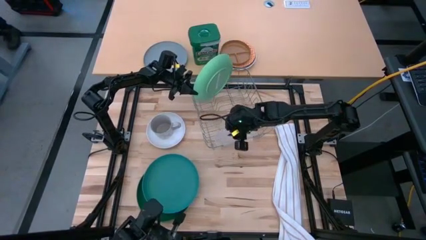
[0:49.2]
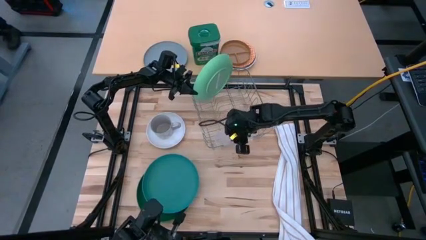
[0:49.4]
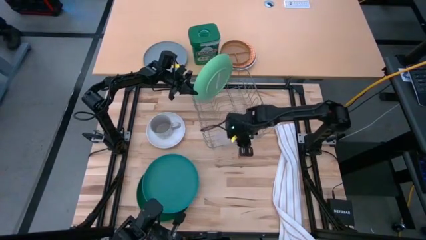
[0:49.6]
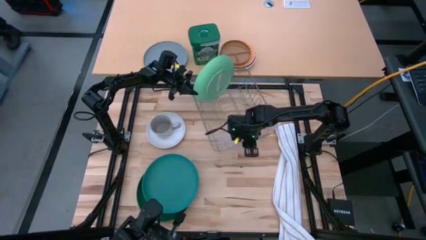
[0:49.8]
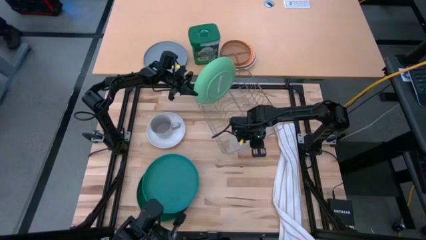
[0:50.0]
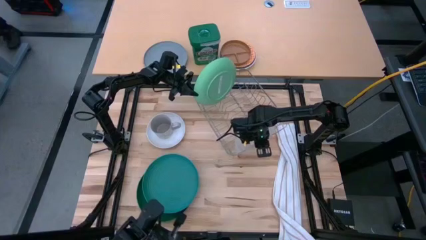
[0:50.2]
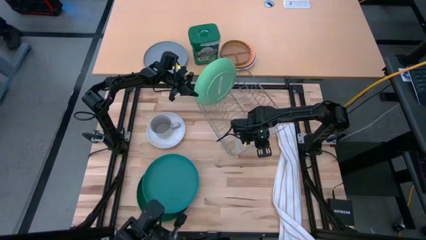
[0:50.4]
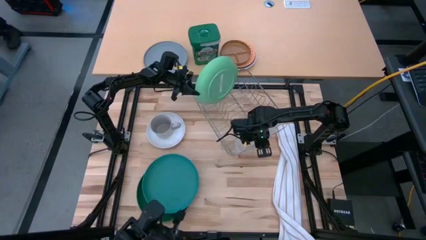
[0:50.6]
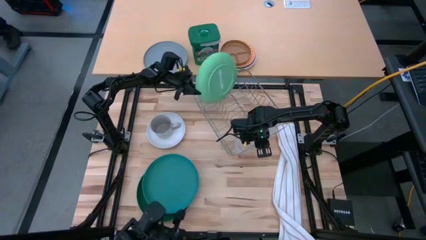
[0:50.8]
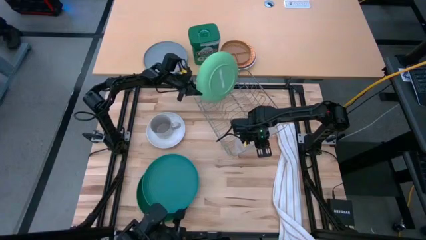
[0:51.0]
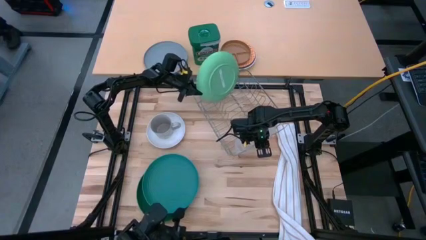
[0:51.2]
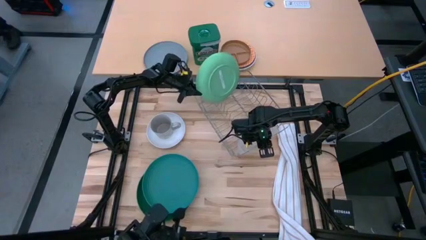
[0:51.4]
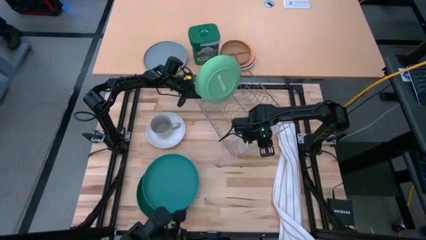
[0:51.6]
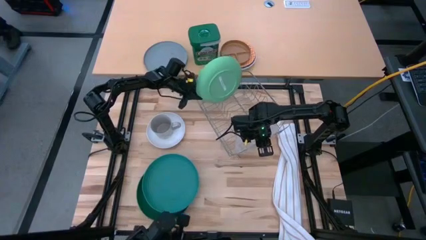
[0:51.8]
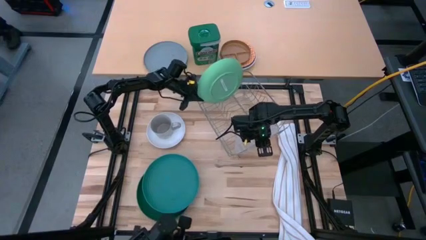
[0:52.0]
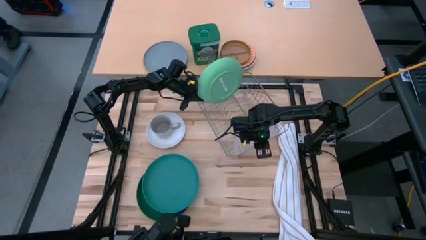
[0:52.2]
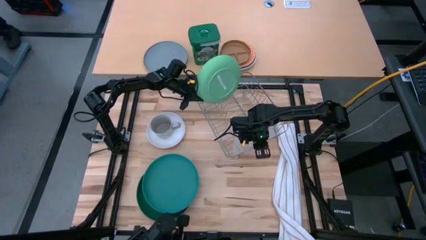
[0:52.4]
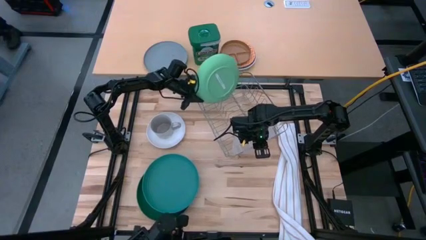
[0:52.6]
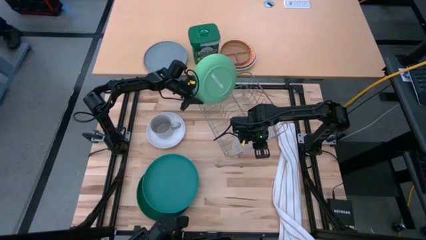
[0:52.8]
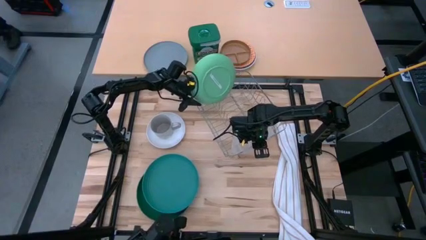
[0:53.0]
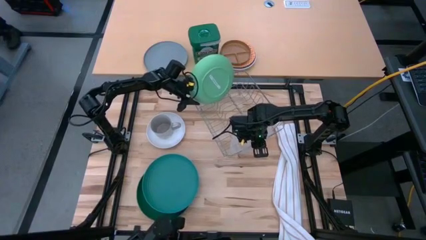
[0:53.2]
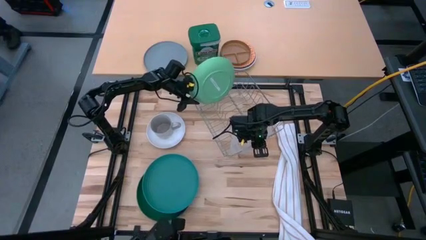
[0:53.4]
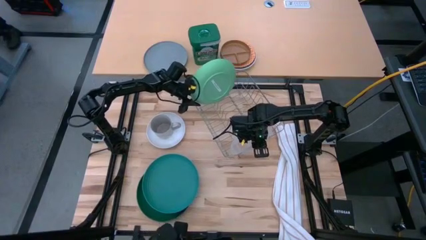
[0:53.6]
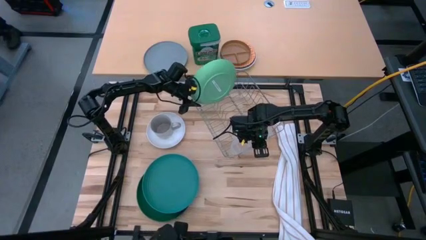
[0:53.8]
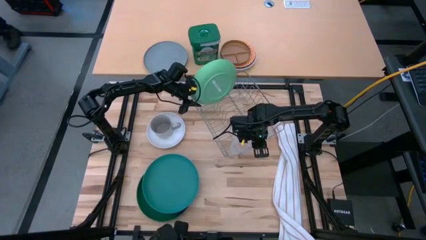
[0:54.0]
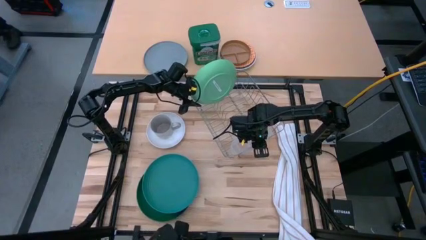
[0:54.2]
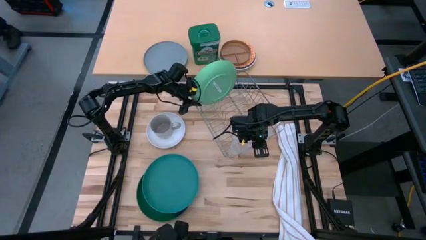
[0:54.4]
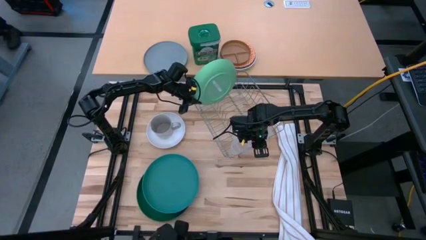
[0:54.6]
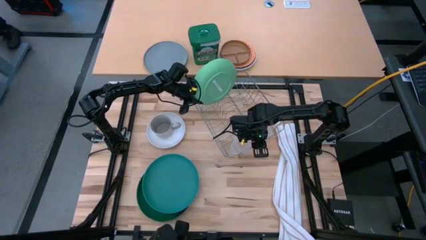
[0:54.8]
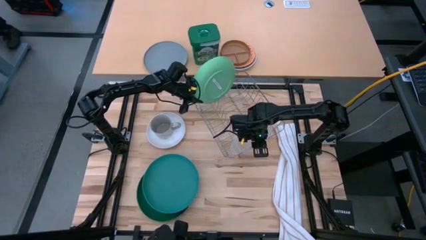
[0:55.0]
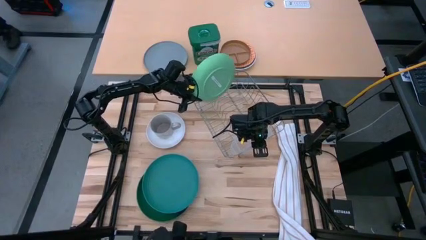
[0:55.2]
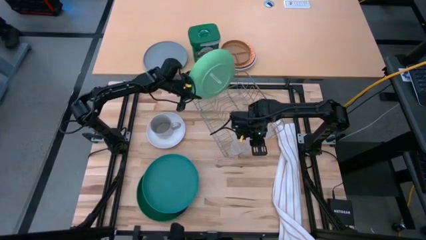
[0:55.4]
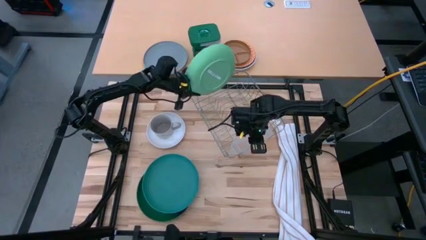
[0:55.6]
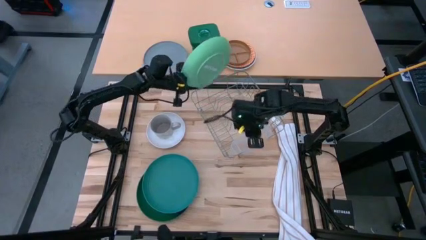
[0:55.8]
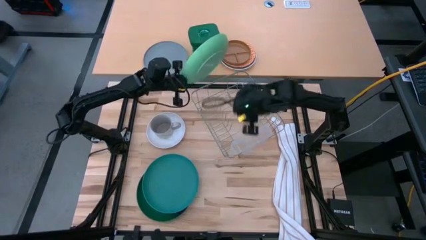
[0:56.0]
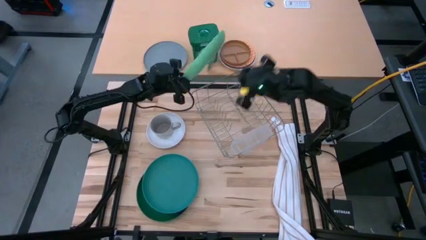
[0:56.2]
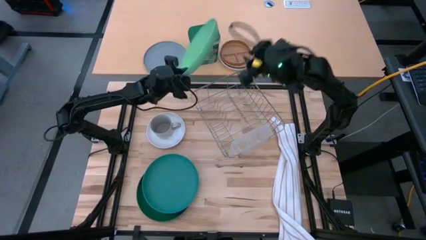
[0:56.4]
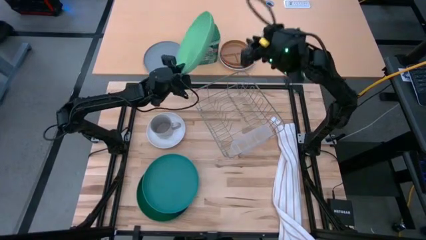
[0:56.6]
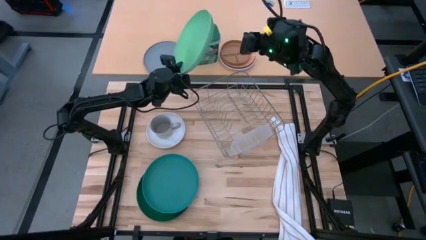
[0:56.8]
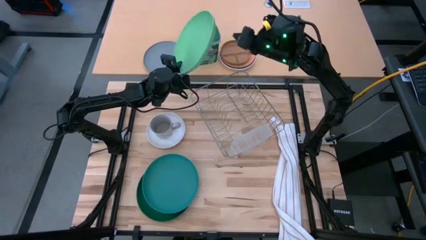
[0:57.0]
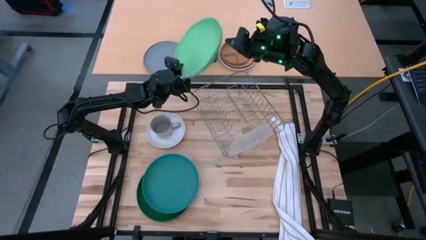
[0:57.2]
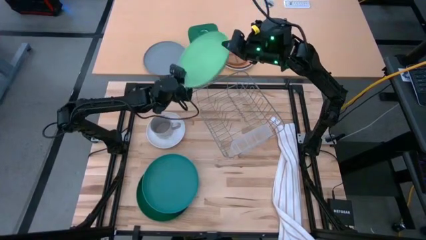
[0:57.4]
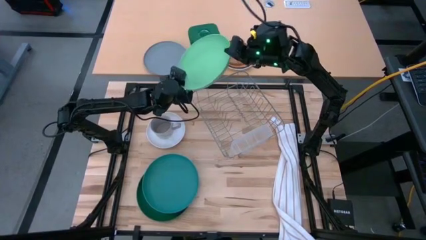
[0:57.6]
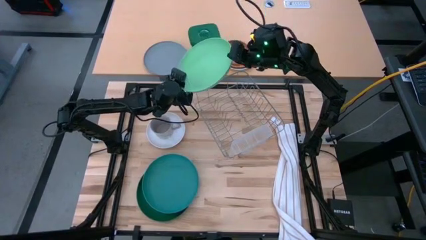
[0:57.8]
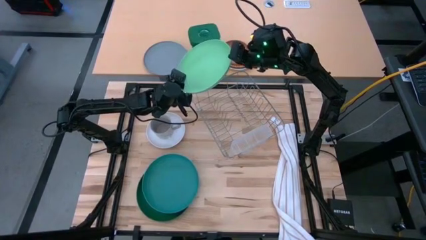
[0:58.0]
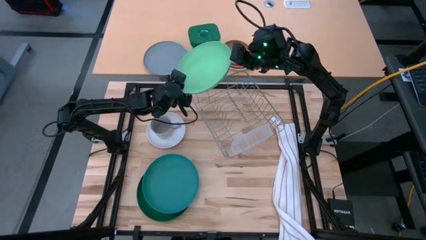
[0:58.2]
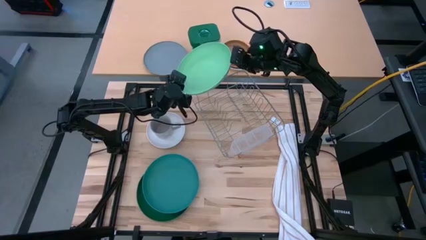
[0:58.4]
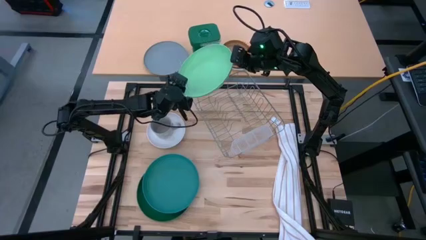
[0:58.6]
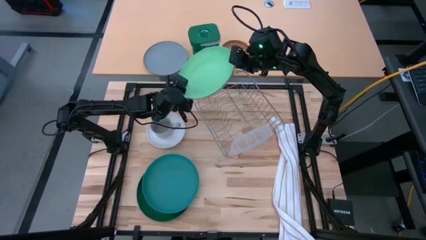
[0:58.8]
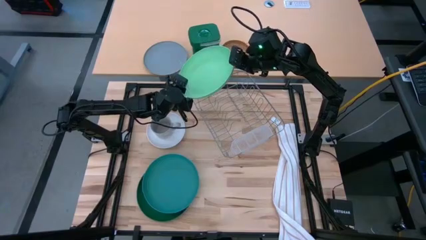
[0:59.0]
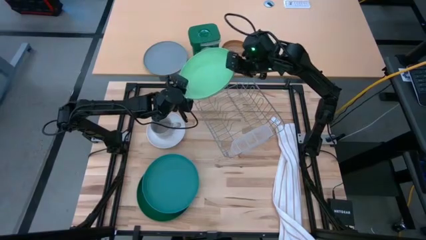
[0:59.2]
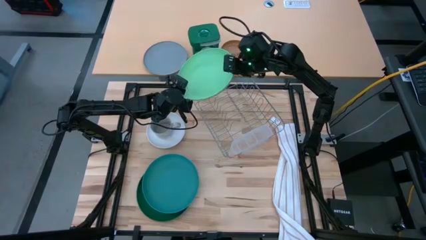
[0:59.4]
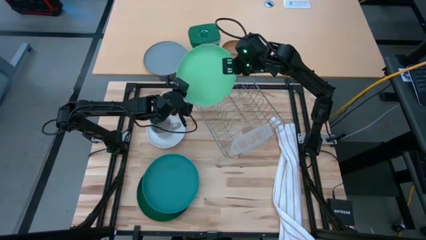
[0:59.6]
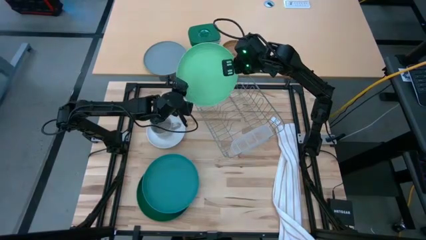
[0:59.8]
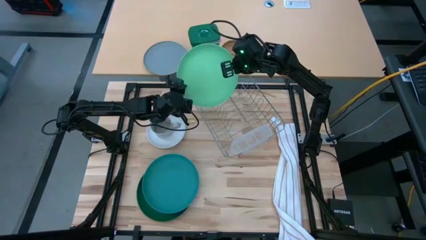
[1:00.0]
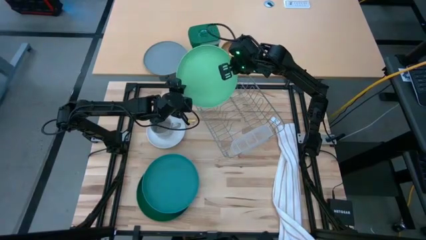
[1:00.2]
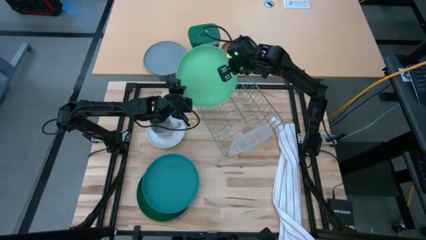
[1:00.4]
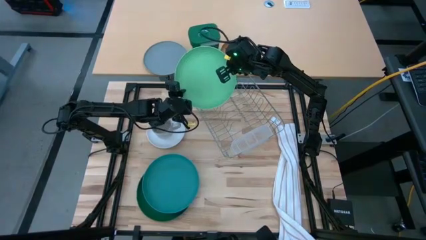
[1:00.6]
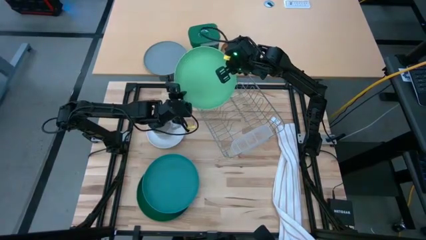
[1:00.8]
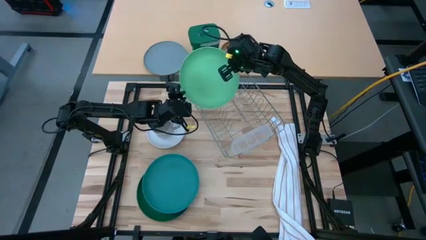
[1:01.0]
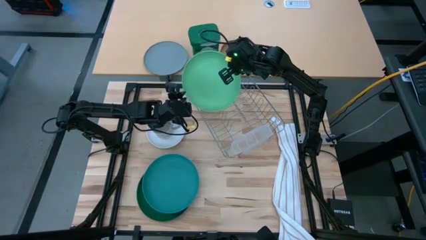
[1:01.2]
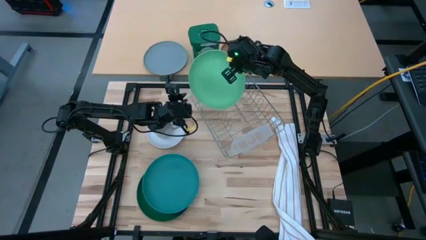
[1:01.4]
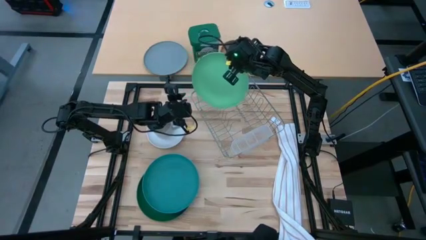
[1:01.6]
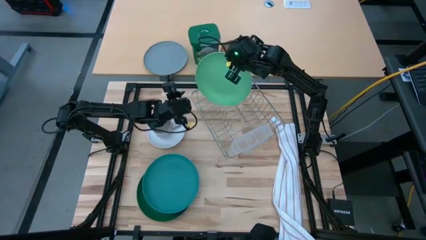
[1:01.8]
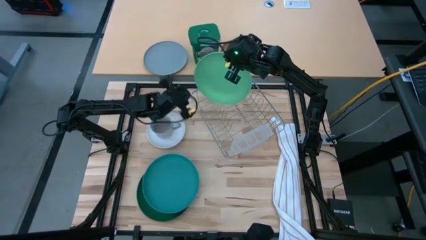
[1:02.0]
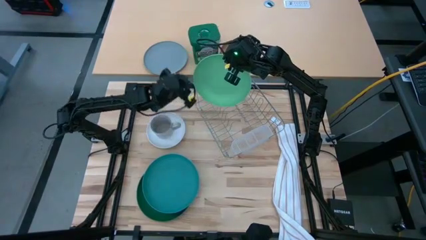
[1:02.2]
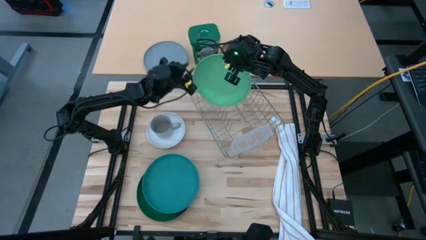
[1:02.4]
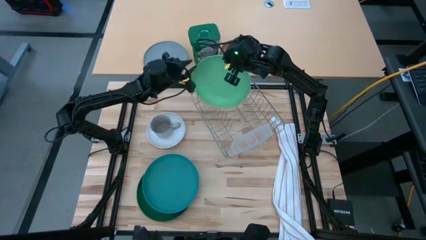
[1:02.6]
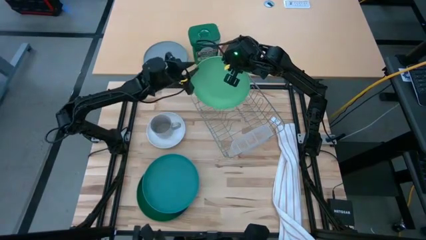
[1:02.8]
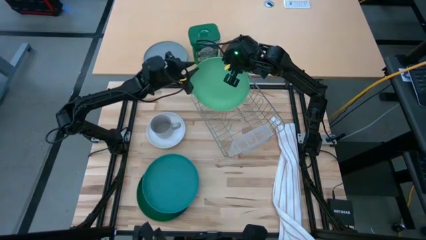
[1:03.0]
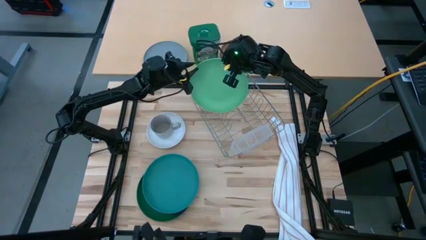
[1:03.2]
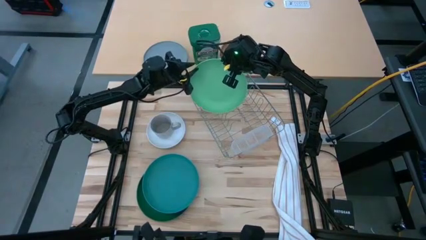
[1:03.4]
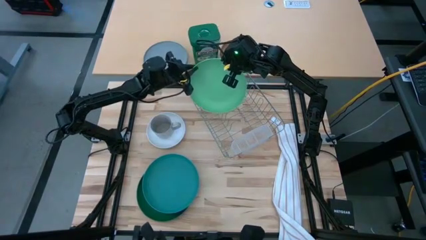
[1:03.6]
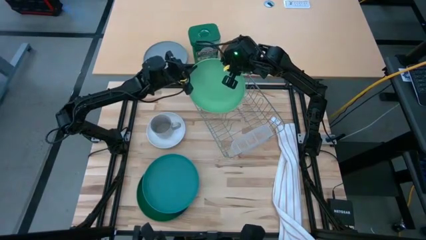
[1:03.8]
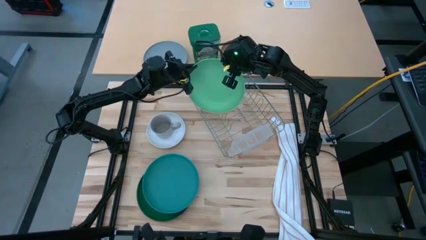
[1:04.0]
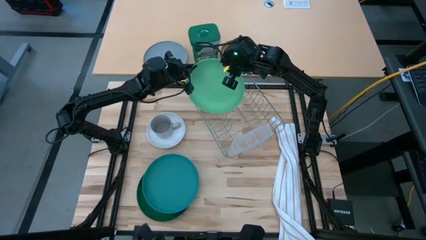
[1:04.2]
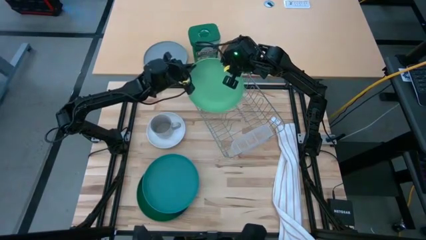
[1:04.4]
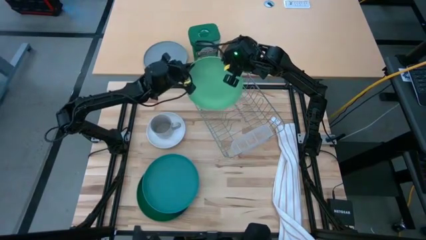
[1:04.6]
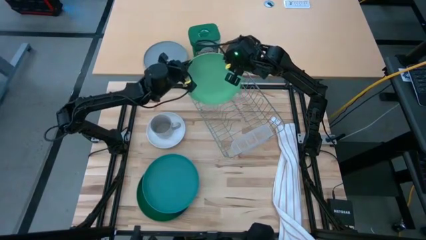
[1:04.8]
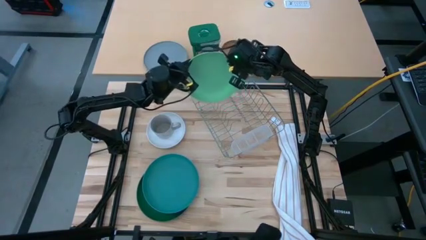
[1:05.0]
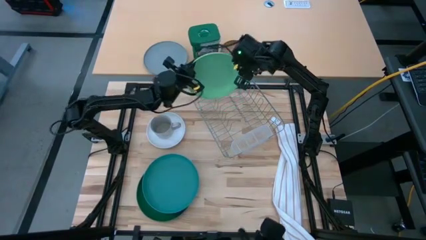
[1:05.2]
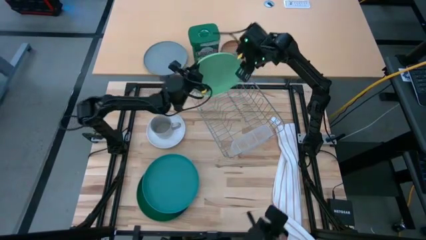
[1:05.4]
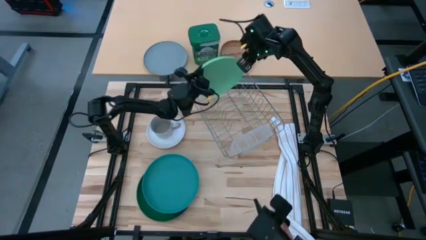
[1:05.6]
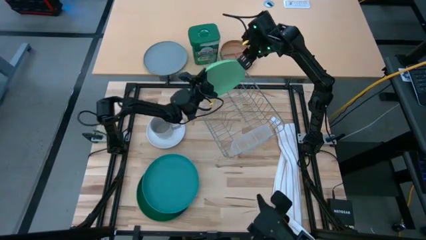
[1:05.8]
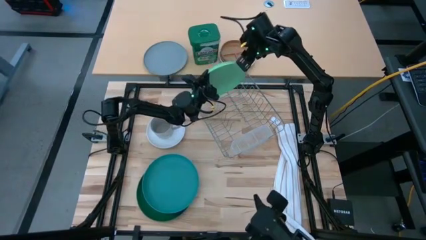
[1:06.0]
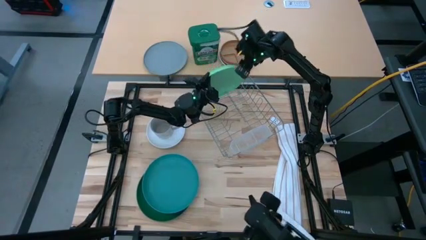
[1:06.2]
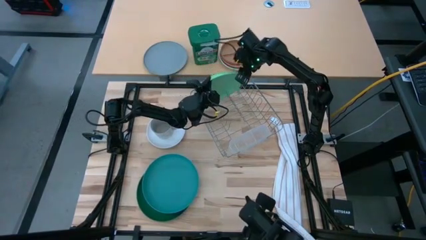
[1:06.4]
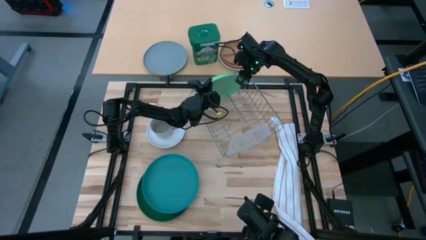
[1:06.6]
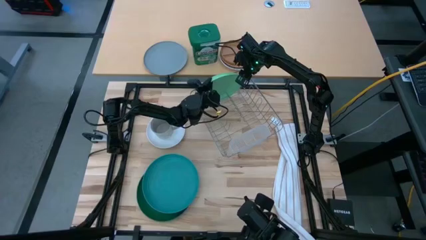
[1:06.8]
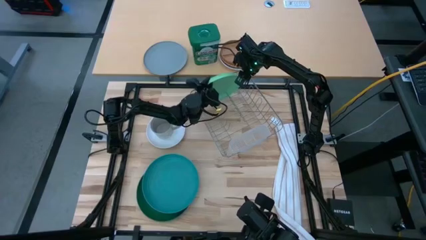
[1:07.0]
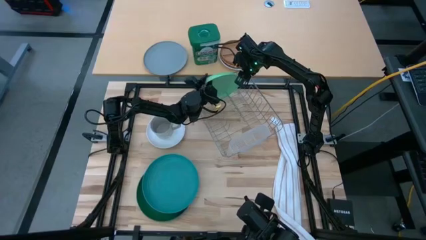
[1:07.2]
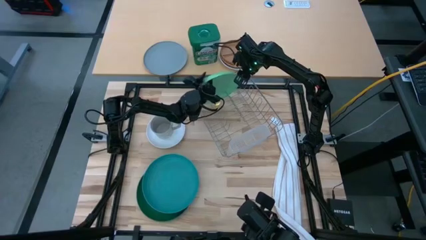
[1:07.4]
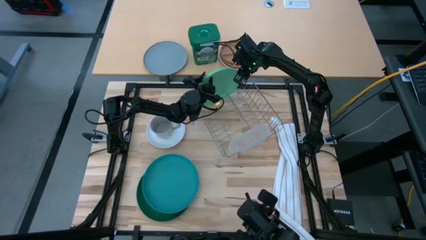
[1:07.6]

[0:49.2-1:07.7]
Task: Sort dishes
Put the light green plate into the dish rack
